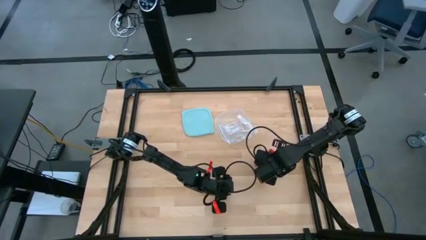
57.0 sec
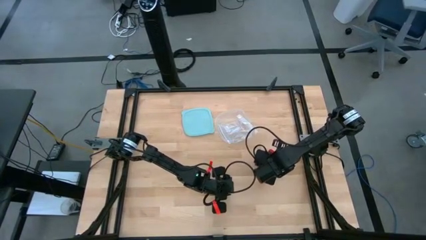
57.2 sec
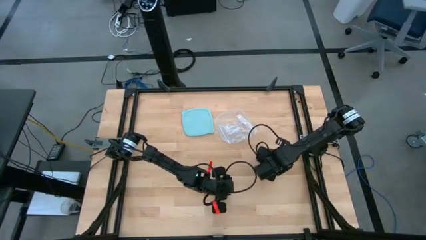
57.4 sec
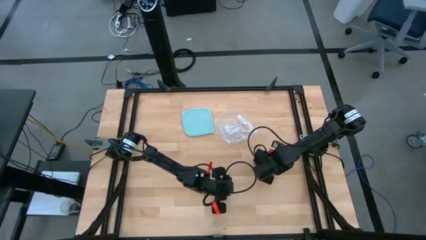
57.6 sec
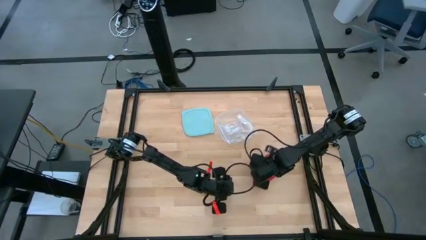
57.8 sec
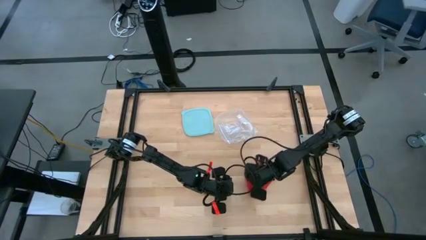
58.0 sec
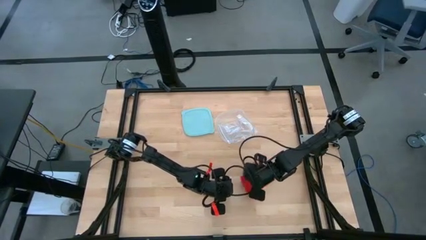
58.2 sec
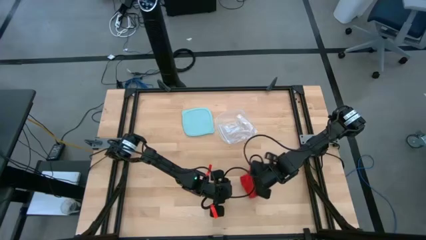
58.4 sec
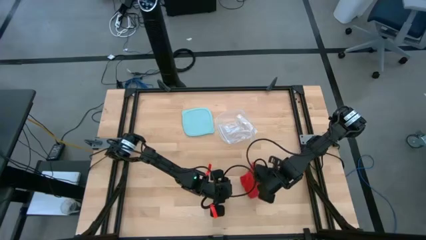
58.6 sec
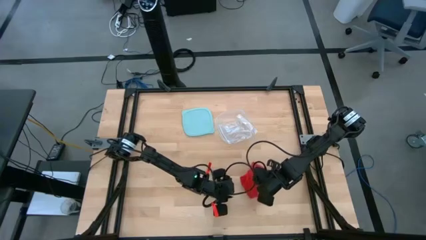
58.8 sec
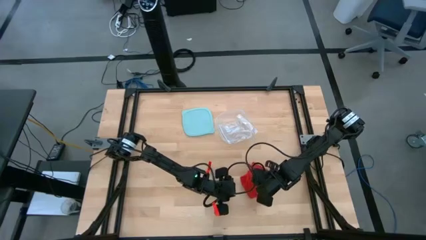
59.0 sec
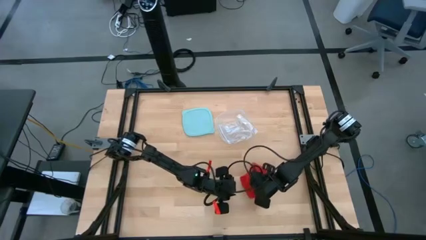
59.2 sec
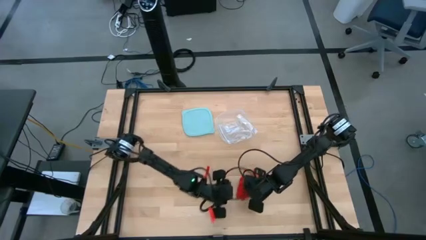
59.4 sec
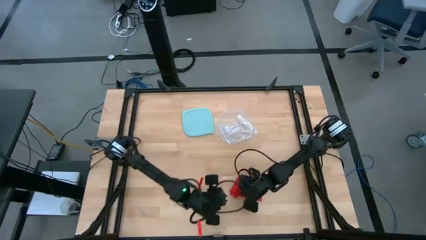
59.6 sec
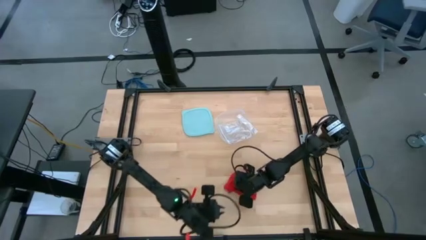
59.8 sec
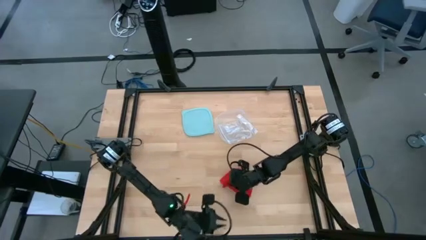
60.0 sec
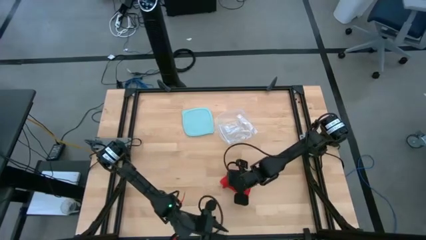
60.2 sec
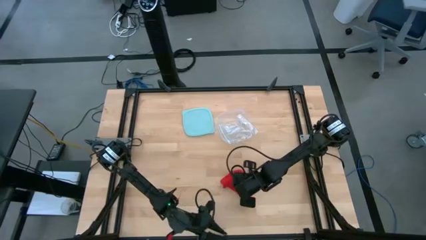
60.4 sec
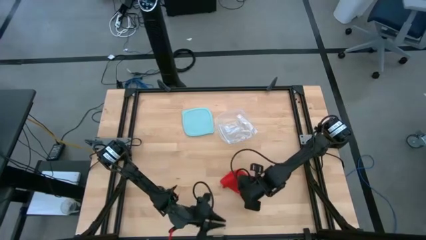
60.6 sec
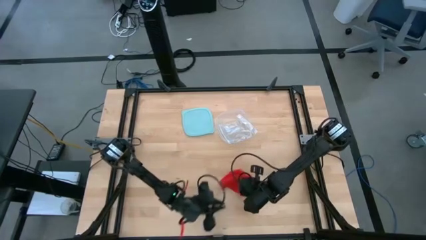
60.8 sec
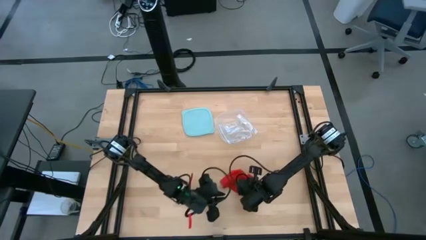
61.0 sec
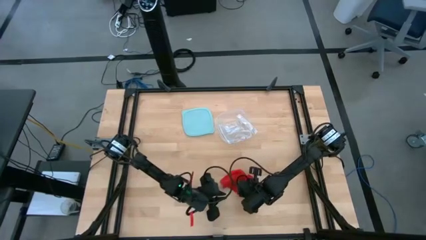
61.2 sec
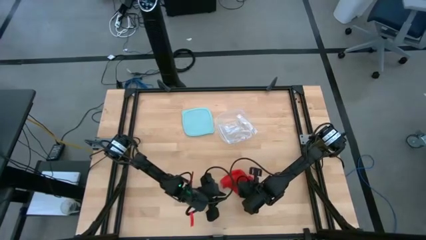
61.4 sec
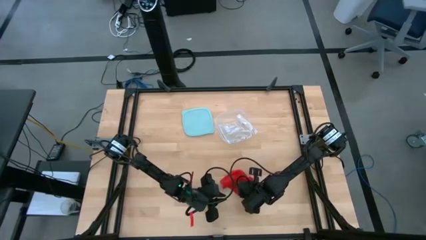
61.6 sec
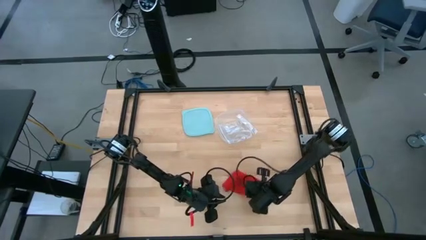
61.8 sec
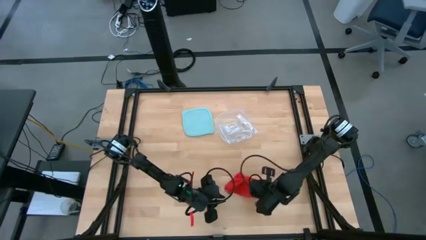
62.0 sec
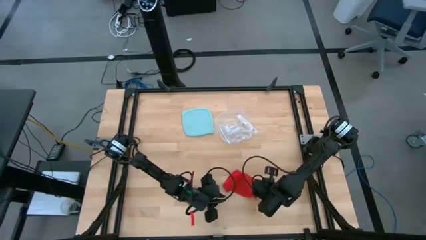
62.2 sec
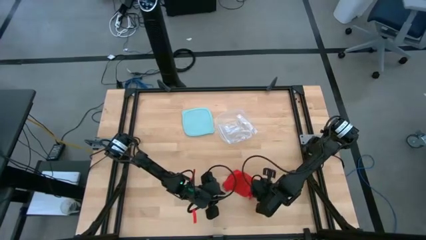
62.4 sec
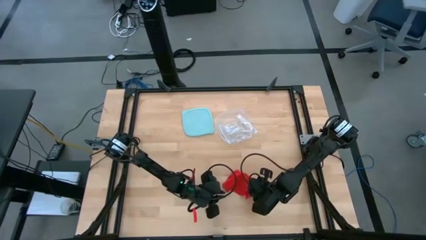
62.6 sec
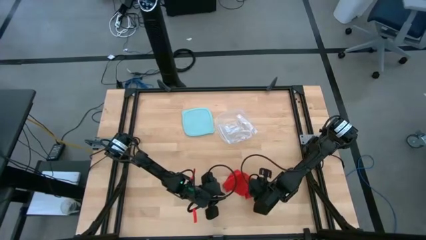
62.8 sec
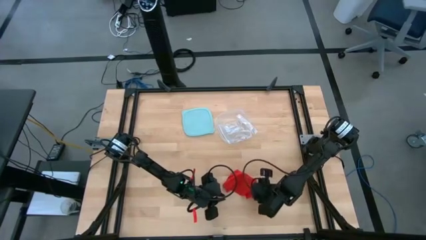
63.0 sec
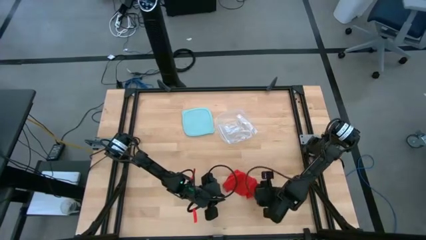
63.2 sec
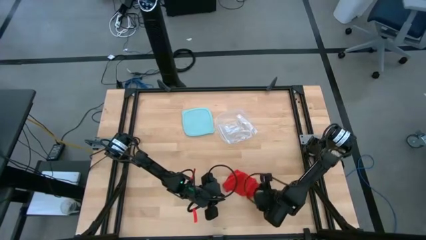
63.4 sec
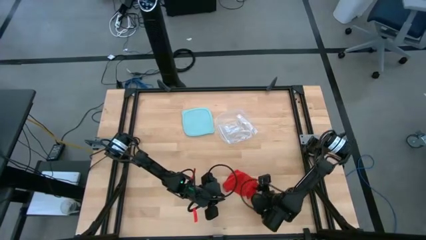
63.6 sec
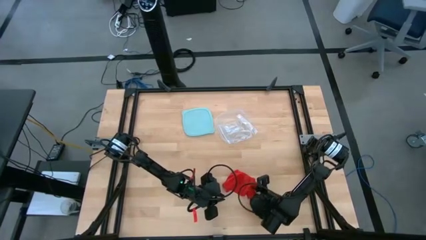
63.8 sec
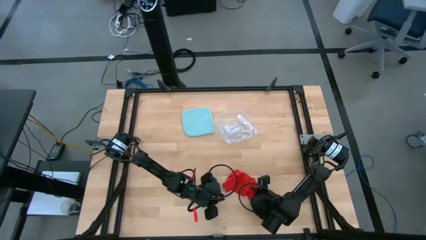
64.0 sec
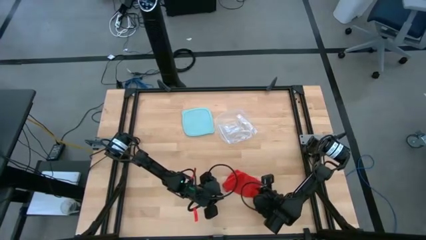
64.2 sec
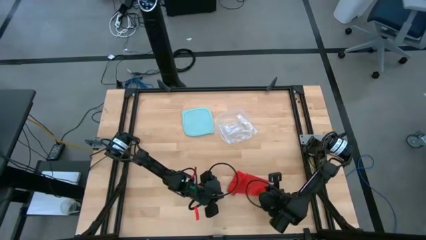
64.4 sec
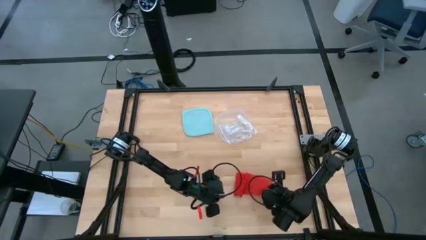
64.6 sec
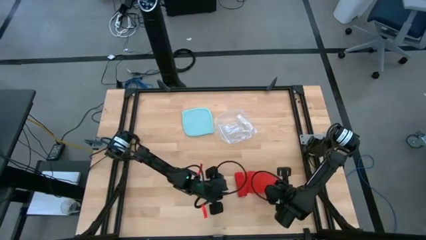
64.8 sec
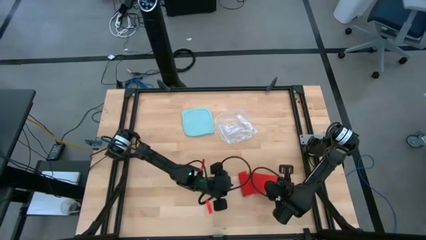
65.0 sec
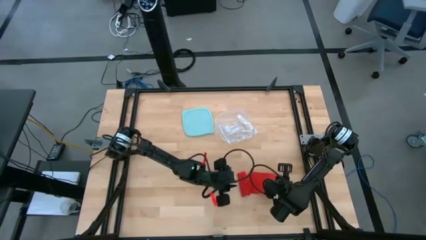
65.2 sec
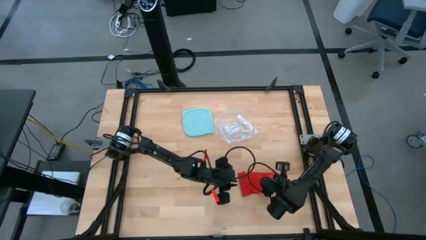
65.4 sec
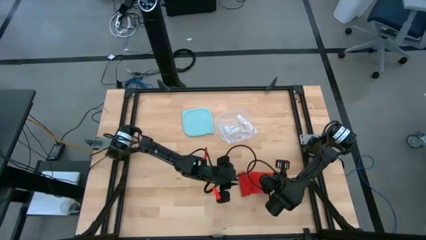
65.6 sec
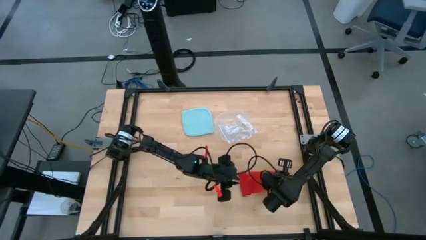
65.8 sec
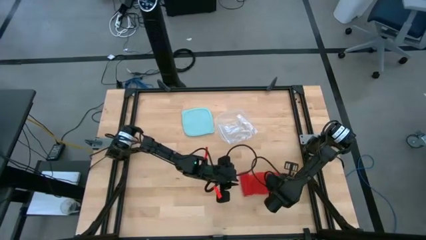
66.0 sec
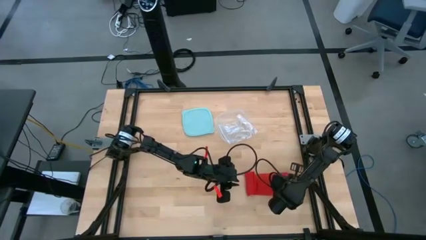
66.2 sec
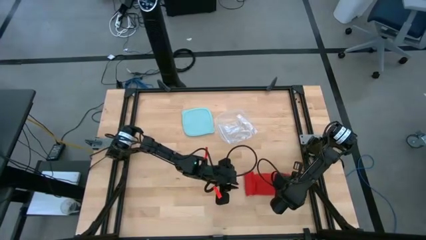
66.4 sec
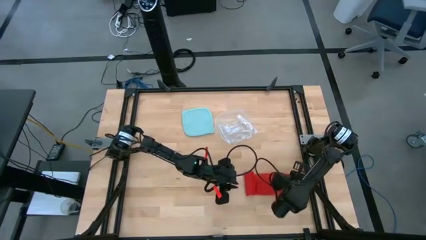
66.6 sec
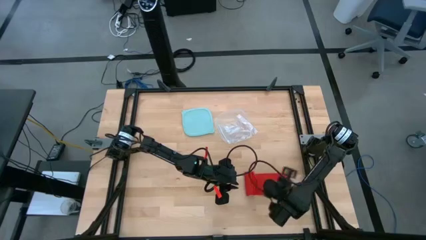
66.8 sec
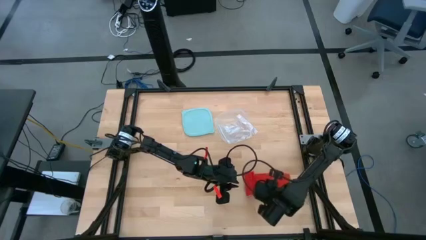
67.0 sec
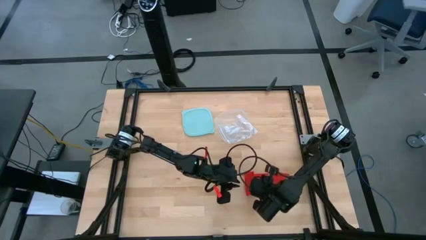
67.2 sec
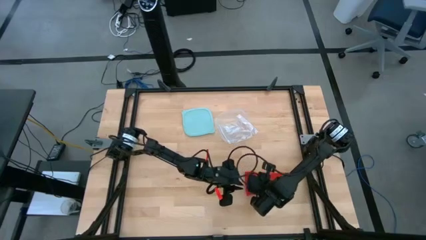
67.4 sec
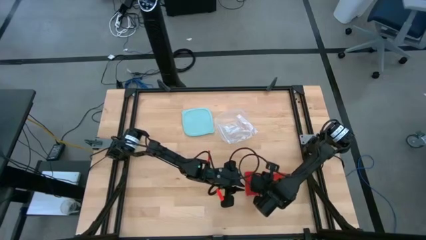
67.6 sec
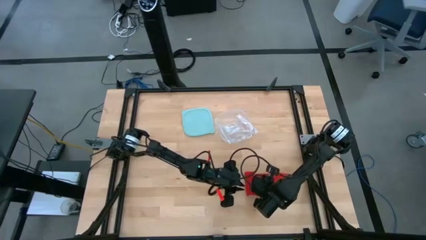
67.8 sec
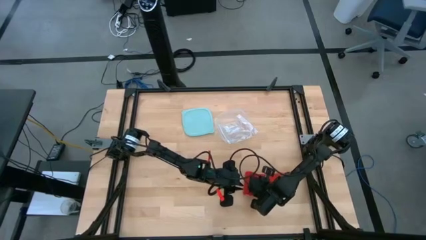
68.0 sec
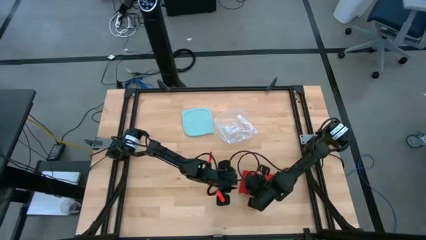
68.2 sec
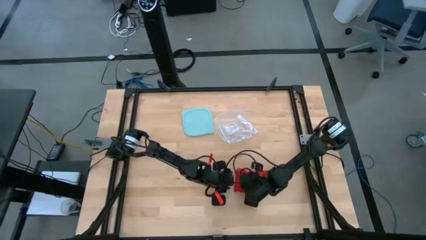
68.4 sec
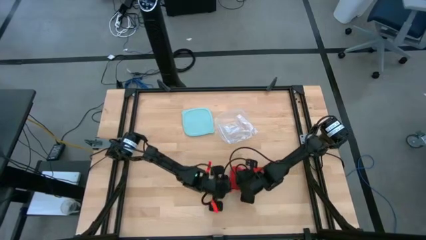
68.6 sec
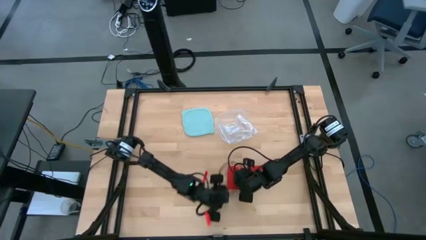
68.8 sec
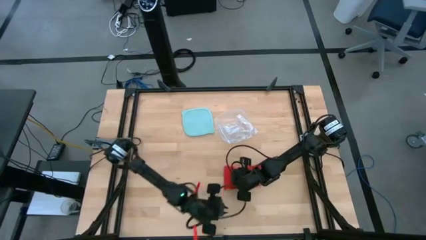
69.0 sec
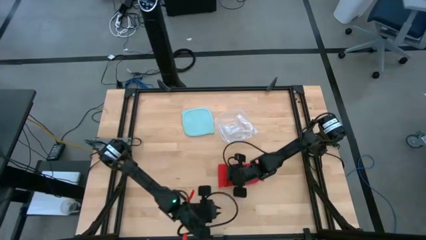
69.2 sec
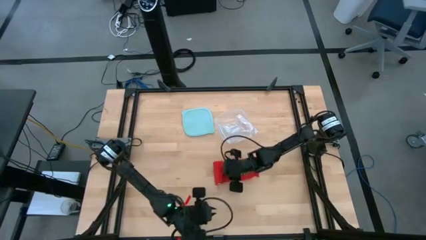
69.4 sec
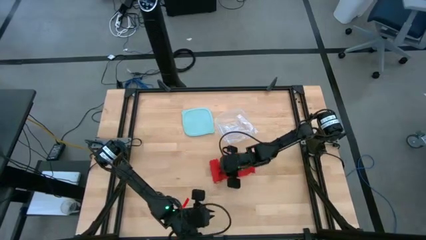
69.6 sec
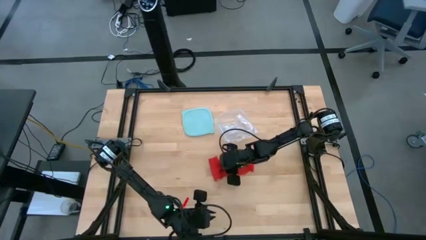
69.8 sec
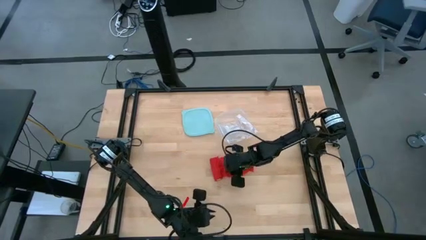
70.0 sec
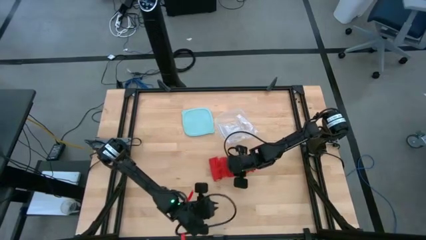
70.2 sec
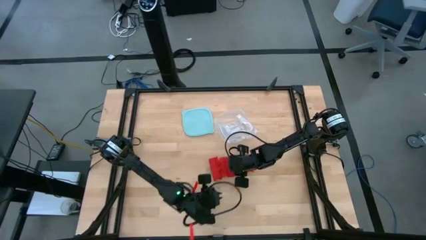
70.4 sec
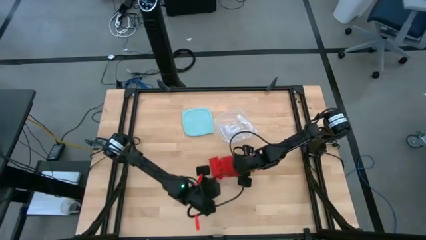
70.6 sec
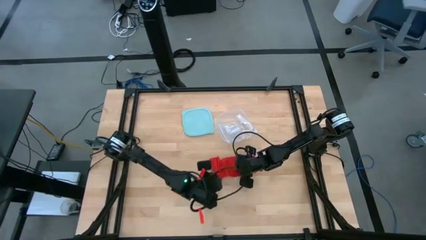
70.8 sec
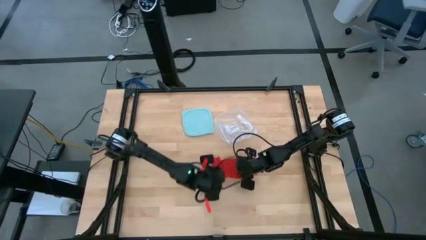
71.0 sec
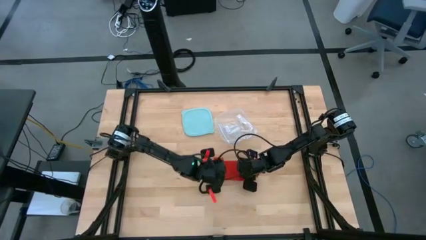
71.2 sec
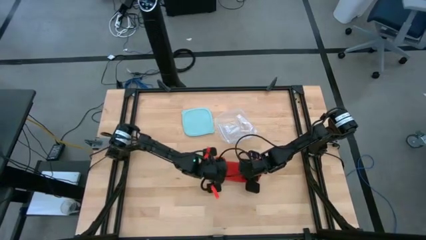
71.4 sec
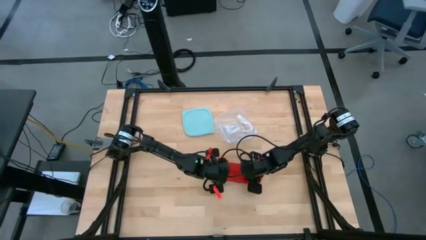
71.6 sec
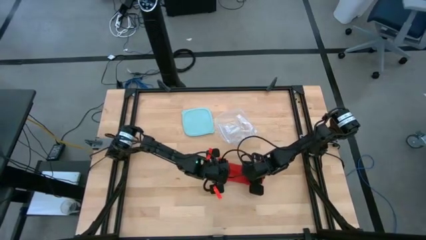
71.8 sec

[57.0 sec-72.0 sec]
Task: Roll bandage
Roll the red bandage

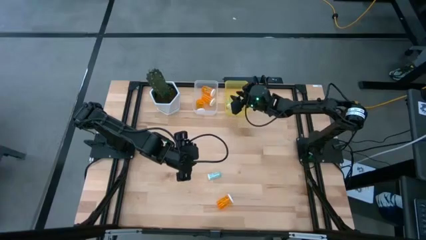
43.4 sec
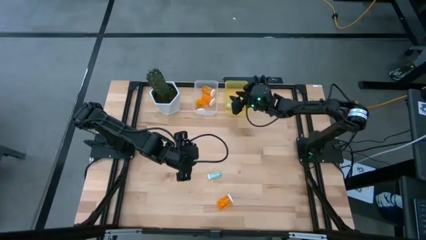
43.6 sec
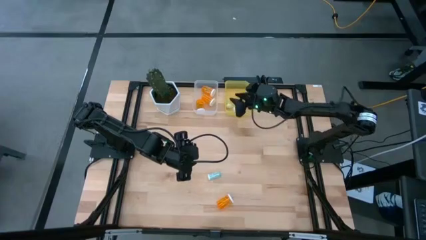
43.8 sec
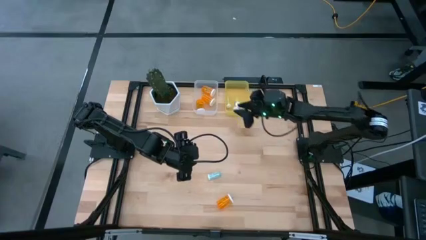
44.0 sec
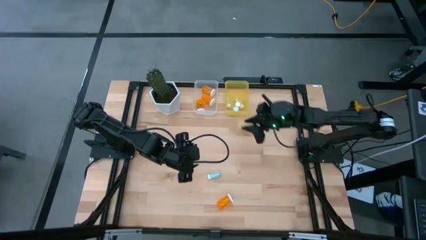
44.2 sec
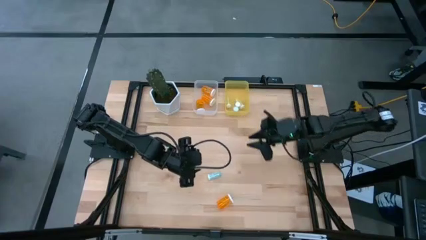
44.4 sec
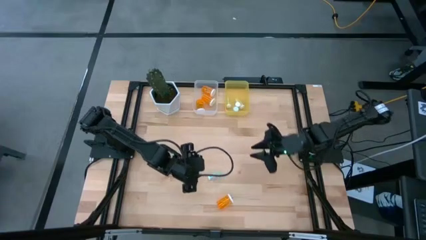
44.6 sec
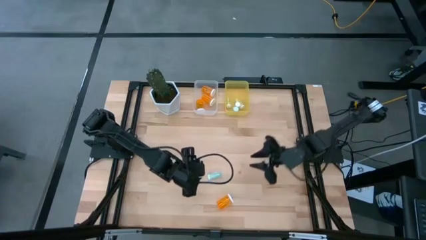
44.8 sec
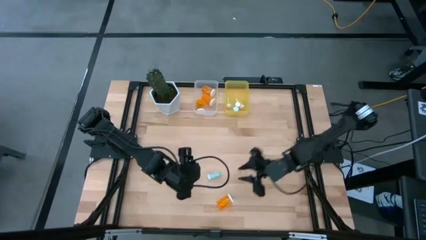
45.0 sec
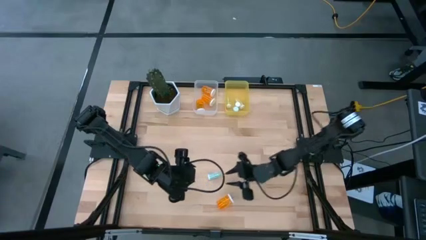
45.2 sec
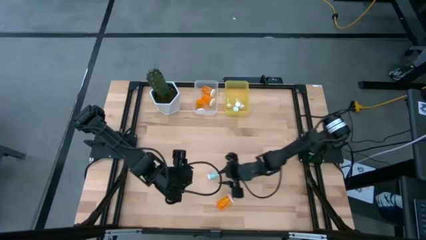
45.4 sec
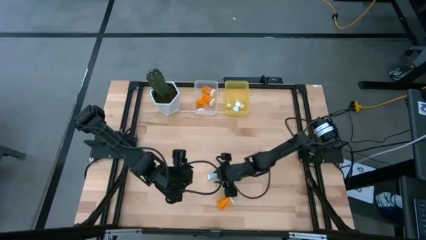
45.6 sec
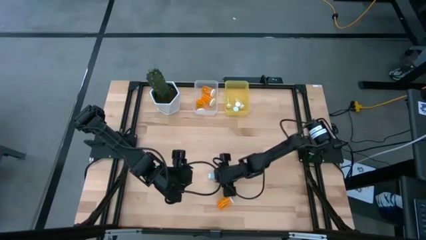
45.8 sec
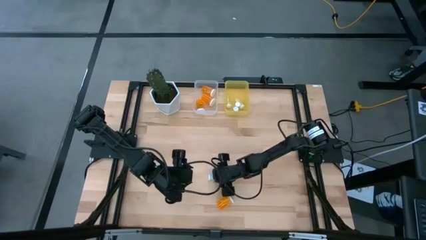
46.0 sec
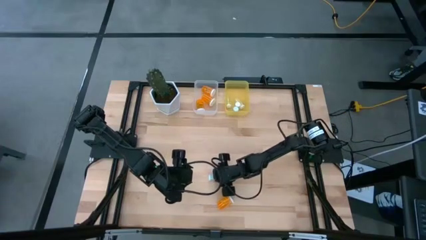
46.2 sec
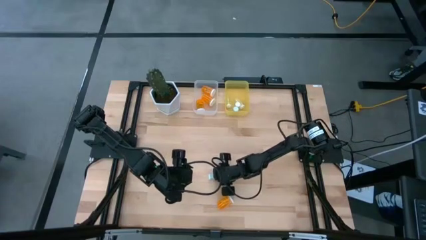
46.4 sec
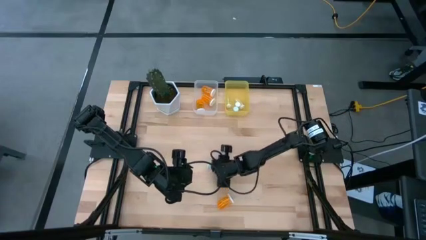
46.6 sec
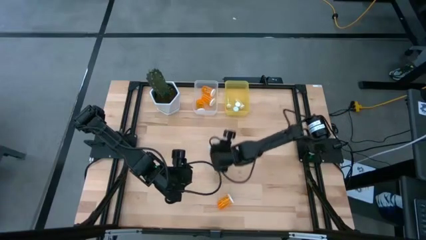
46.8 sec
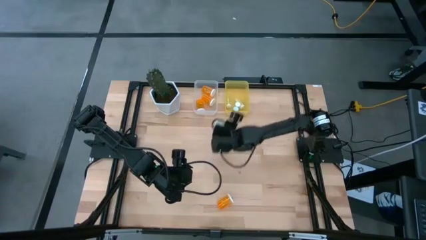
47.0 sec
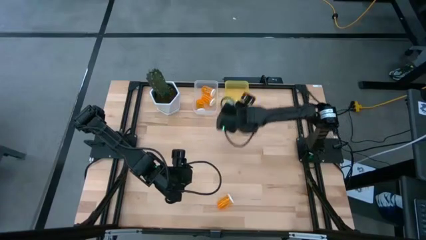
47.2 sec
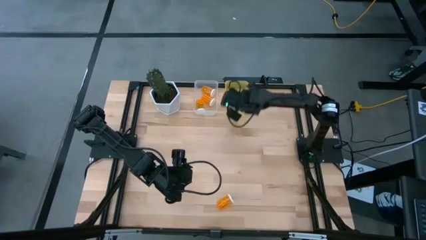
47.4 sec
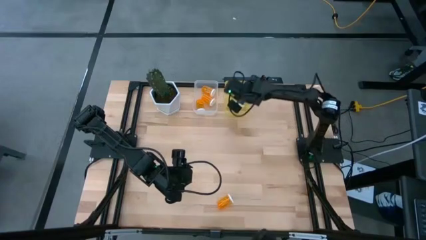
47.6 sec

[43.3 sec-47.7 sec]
Task: Pick and place medicine bottles into bin by pill shape (circle, oval)
Put the blue pill bottle into the yellow bin
